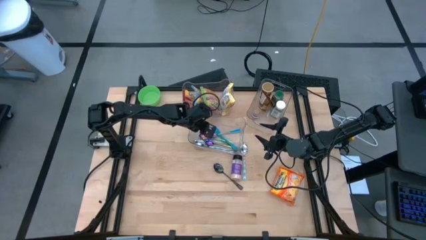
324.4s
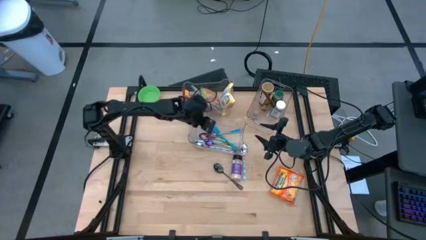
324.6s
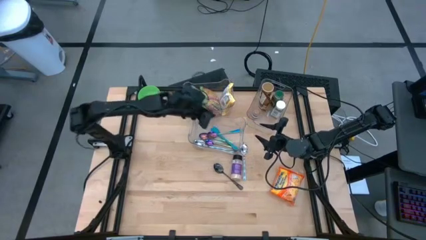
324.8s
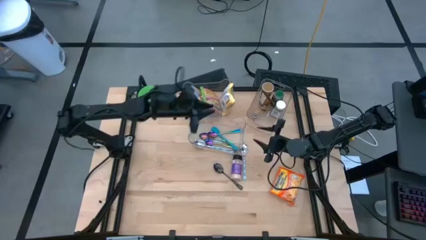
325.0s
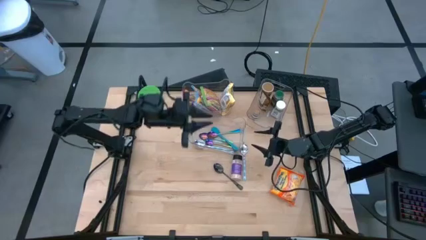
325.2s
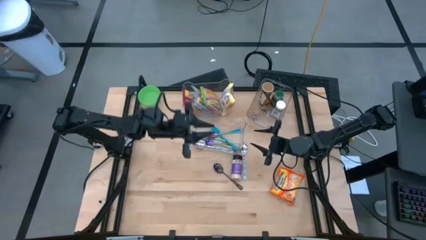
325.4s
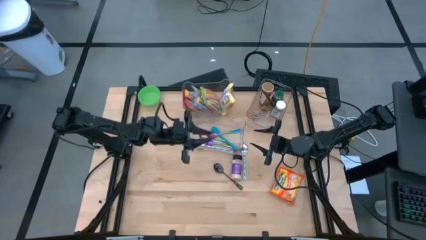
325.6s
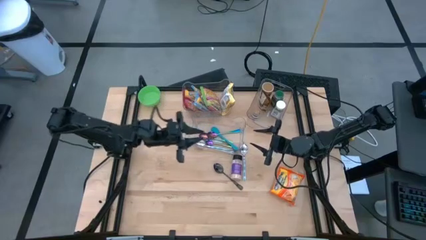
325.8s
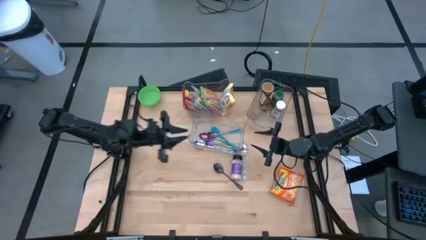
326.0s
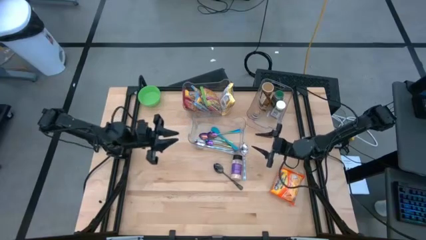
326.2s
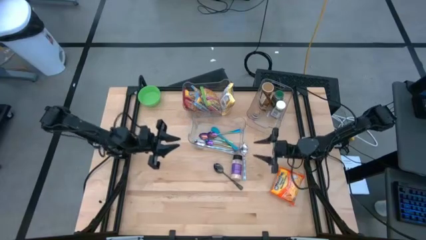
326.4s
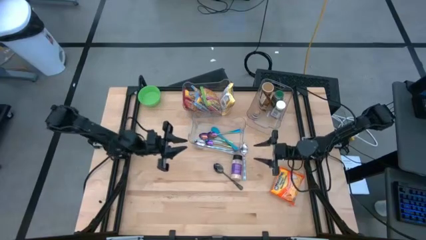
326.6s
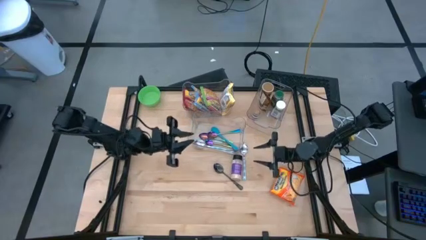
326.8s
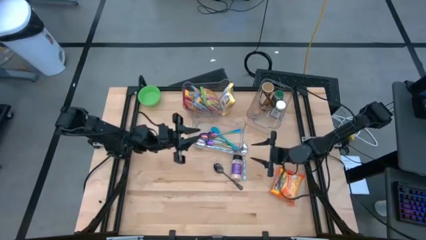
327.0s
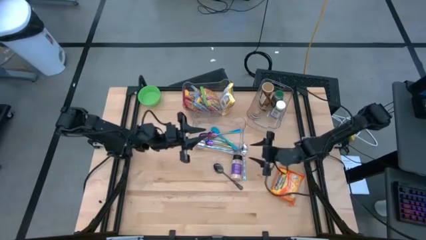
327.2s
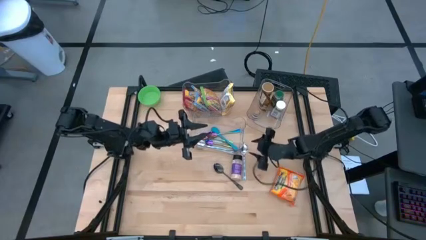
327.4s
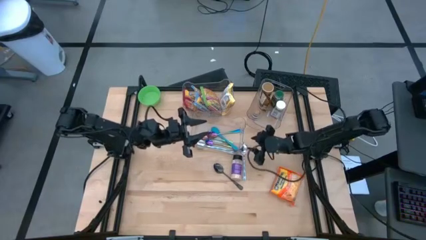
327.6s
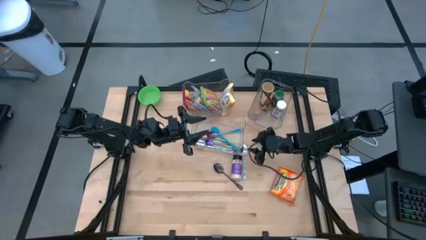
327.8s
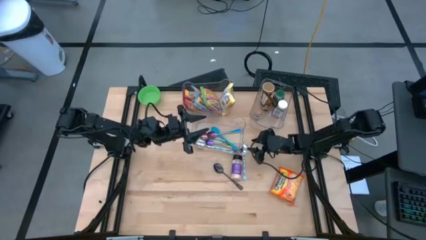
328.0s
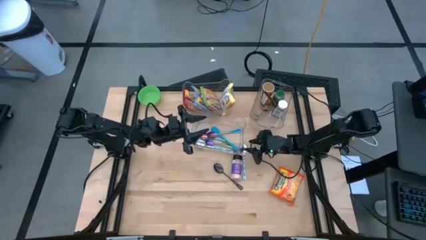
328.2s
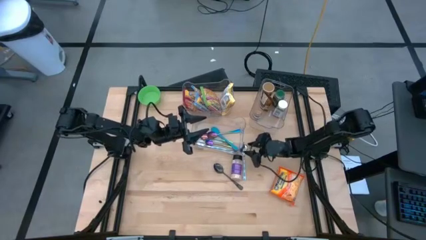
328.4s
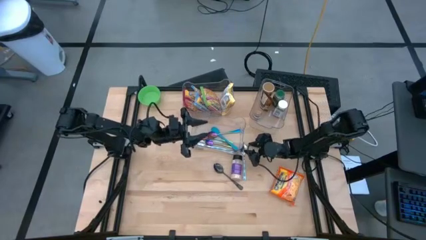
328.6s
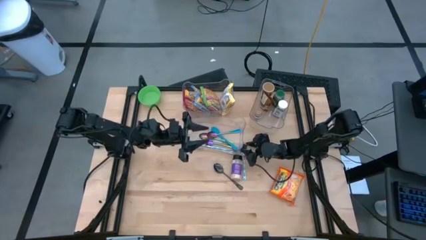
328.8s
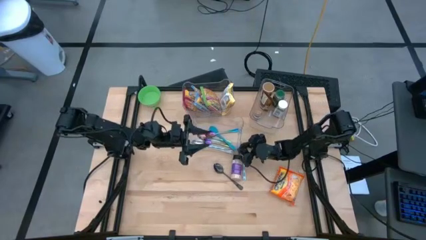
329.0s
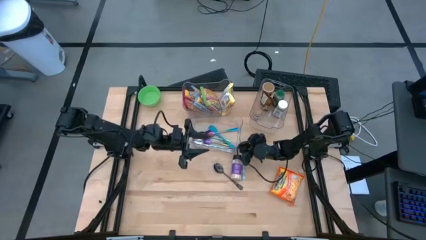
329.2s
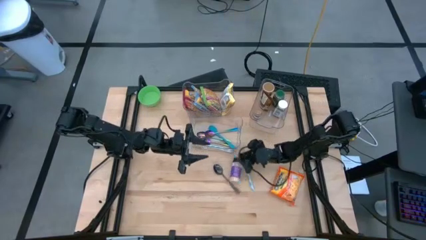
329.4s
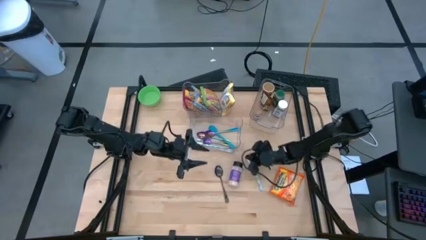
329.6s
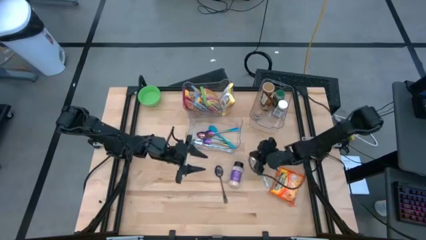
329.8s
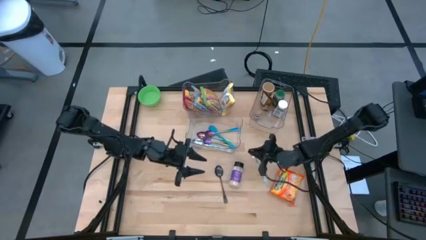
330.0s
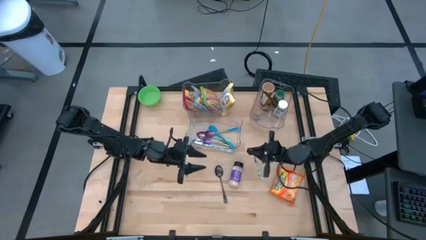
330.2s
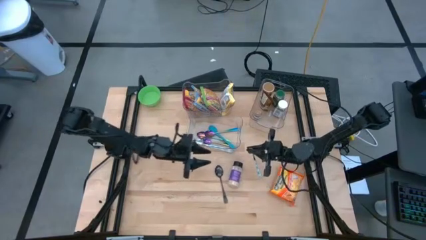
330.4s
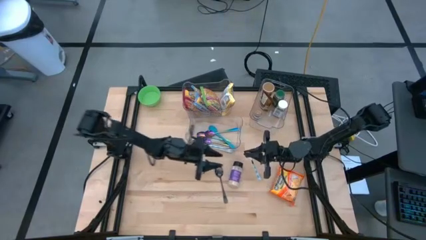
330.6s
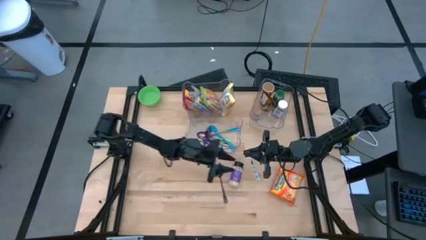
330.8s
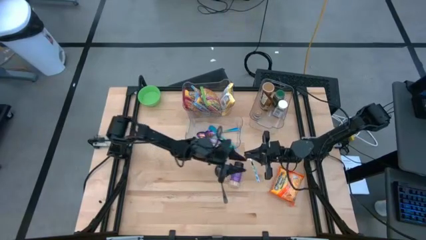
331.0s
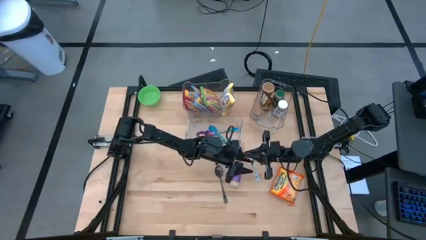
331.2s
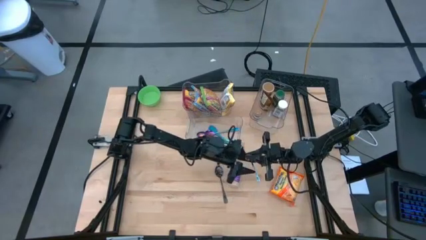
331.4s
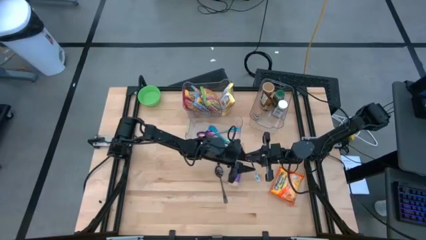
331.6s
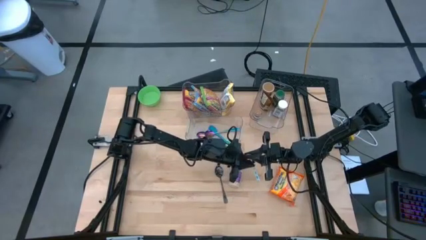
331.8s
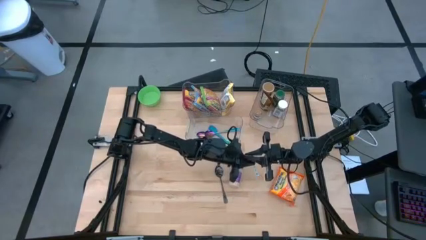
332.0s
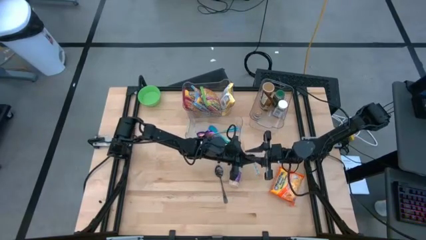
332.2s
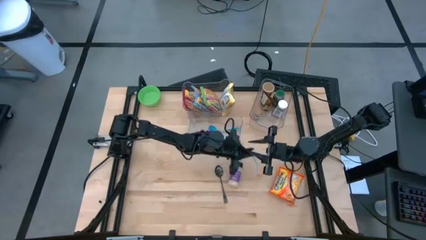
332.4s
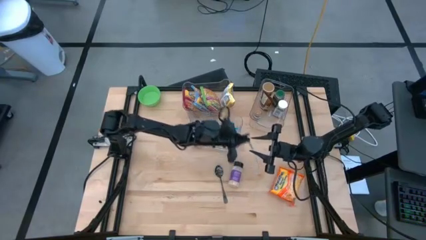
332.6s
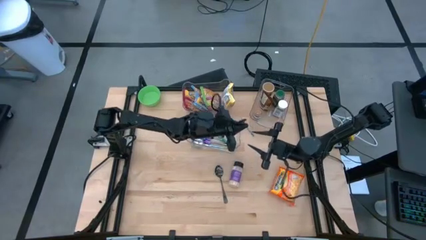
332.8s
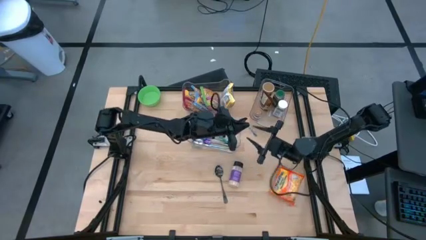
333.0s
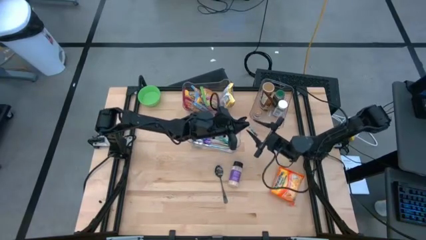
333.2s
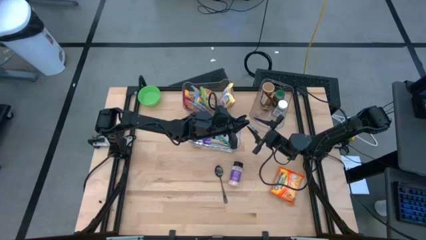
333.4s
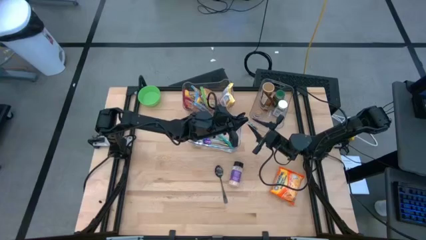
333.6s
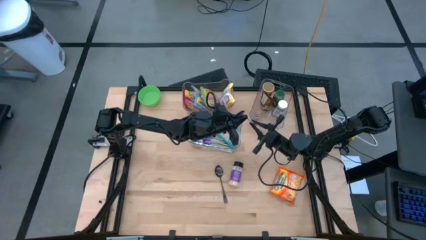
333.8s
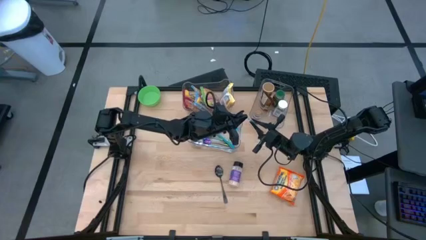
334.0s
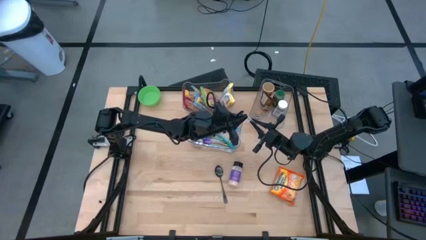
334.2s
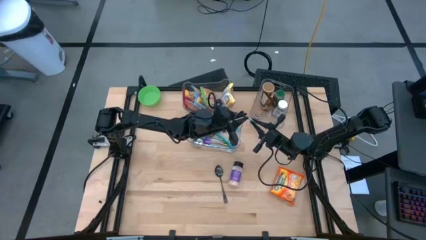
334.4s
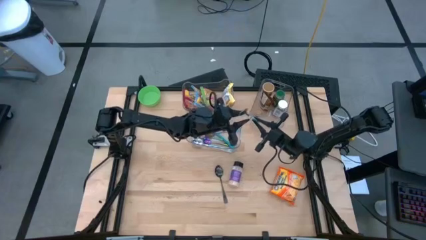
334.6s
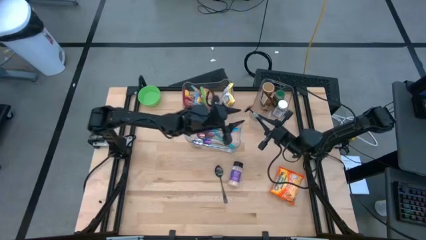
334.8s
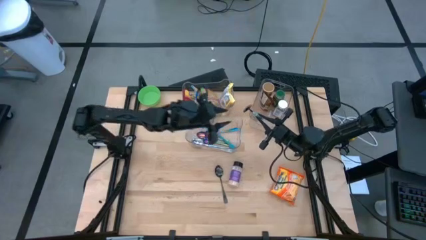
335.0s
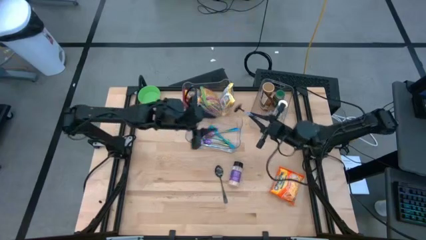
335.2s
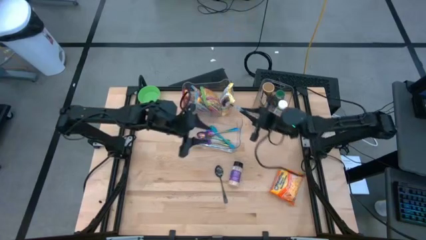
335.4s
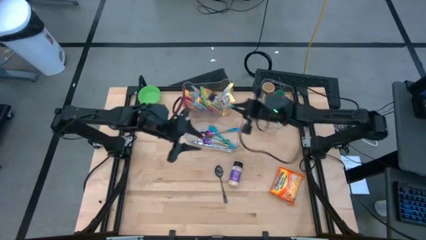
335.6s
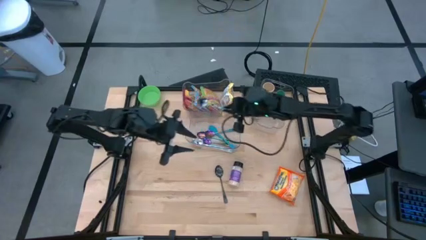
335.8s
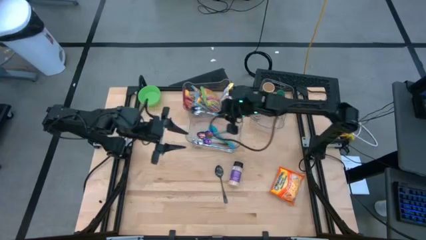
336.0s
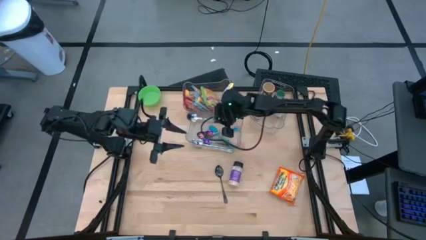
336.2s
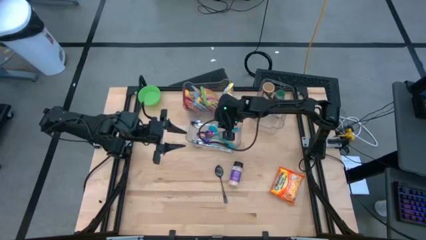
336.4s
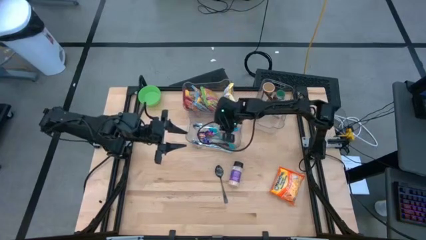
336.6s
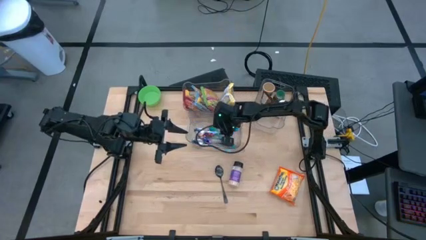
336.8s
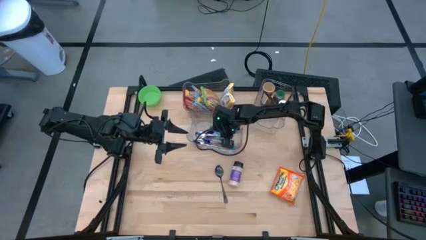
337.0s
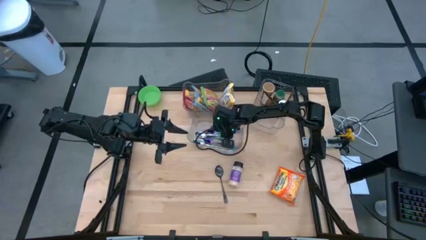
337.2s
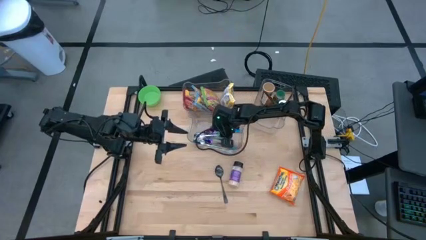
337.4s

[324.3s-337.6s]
Task: Pick & Place Food Item
Put the blue white spoon into the bottom transparent bin
